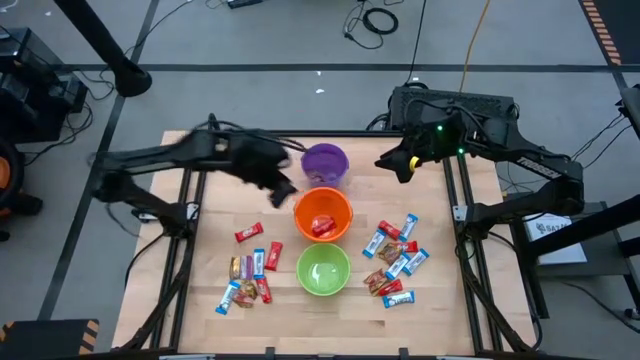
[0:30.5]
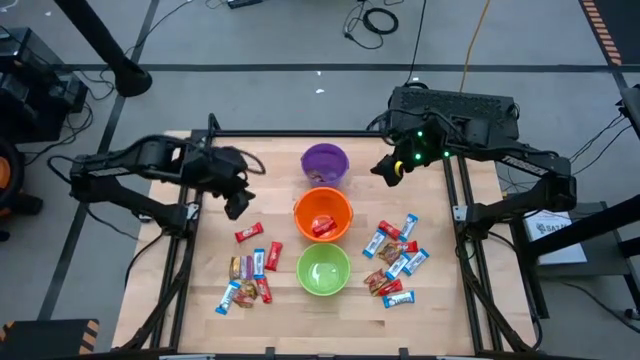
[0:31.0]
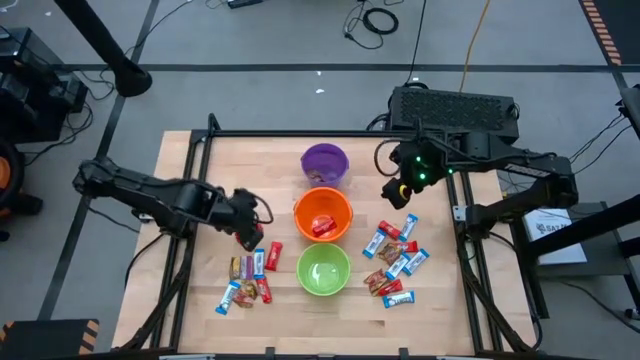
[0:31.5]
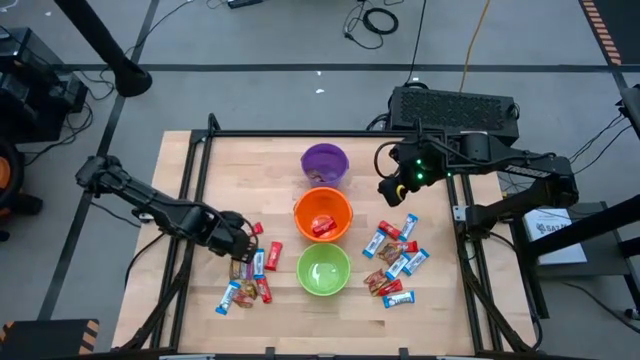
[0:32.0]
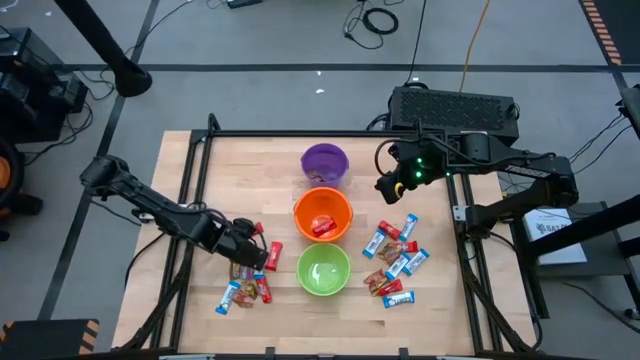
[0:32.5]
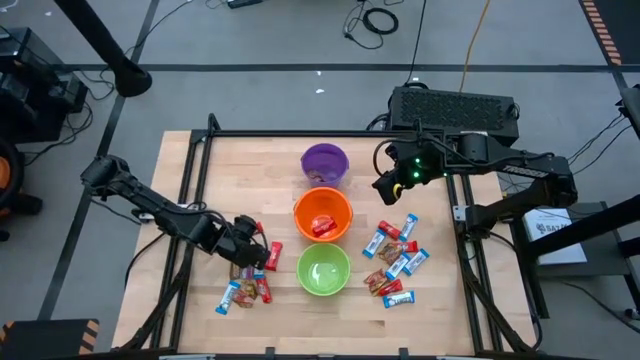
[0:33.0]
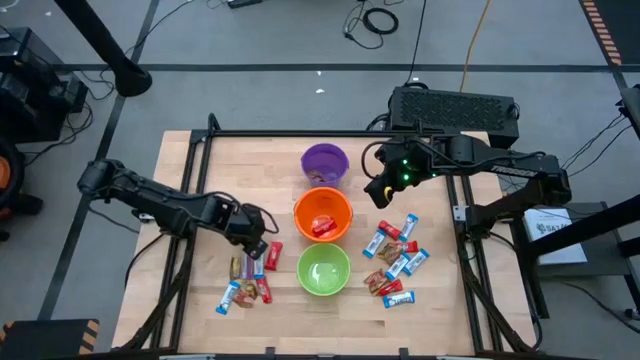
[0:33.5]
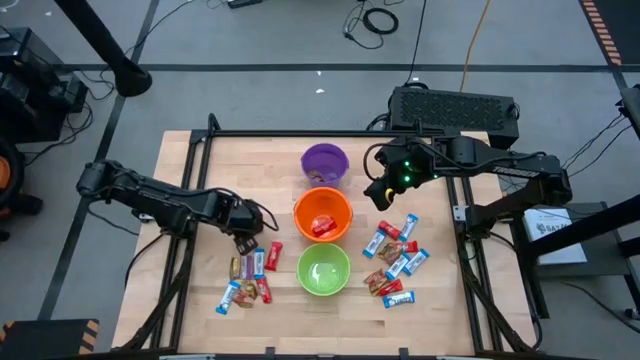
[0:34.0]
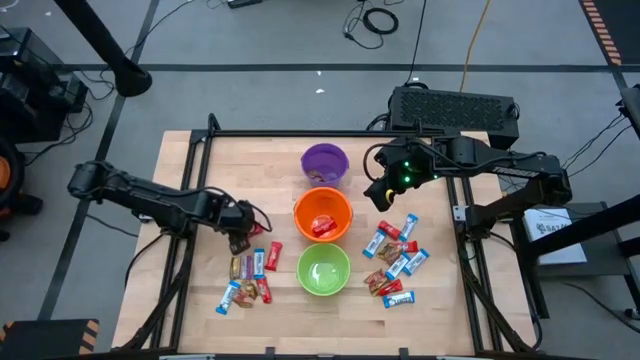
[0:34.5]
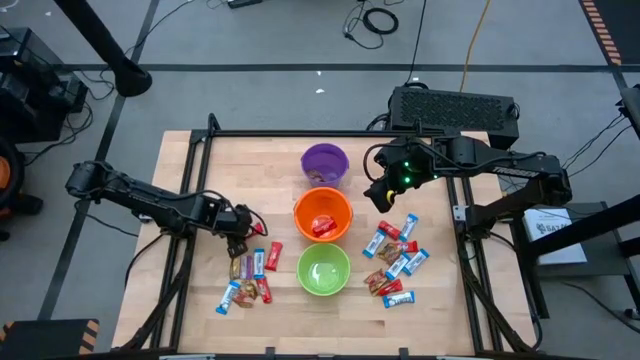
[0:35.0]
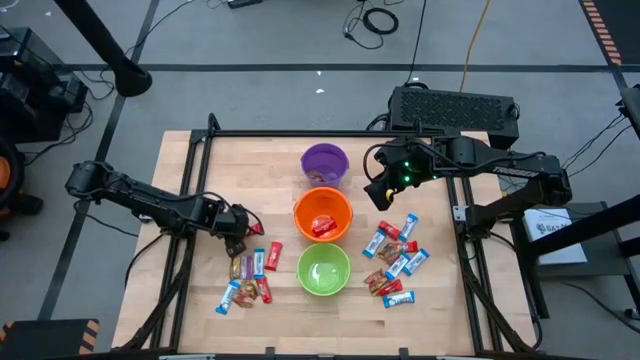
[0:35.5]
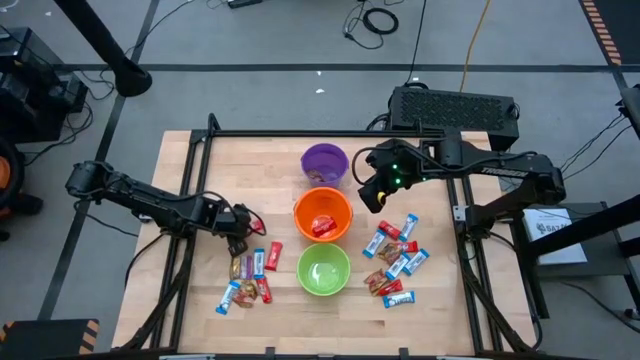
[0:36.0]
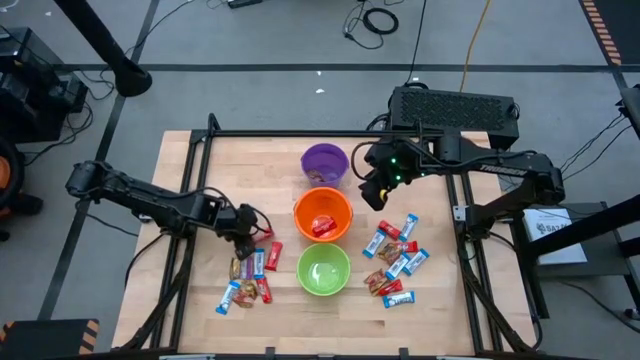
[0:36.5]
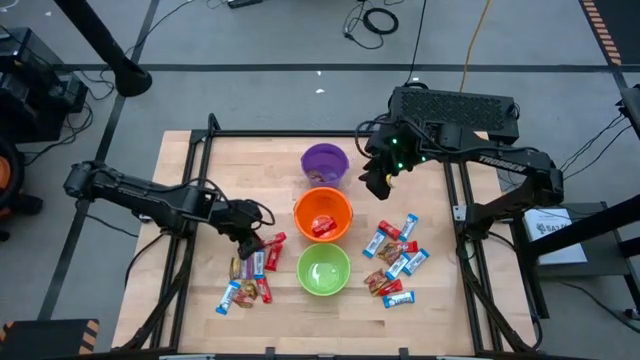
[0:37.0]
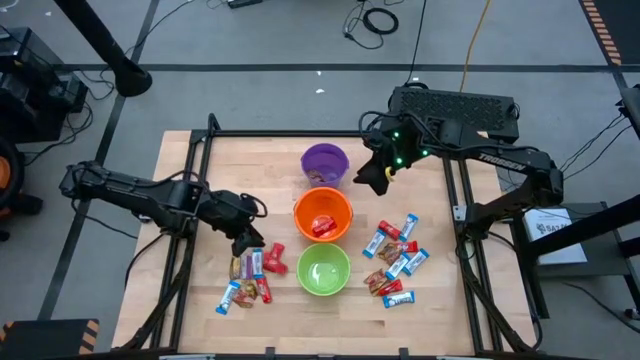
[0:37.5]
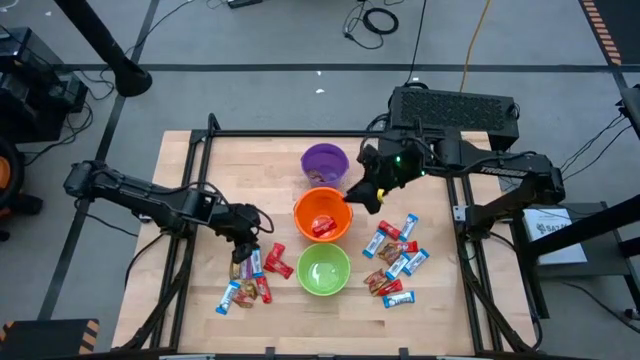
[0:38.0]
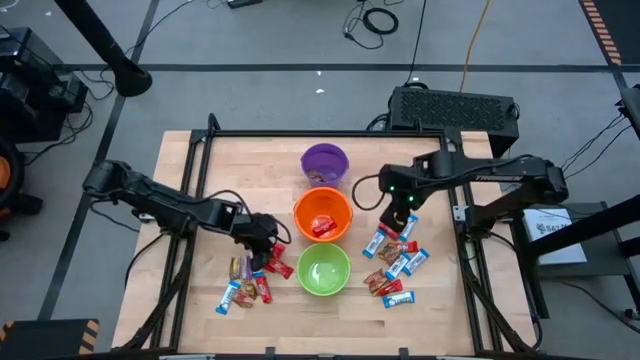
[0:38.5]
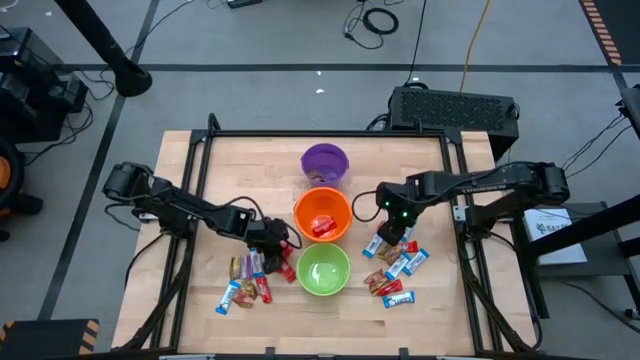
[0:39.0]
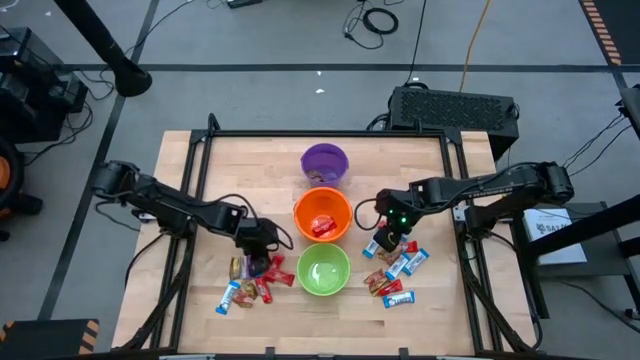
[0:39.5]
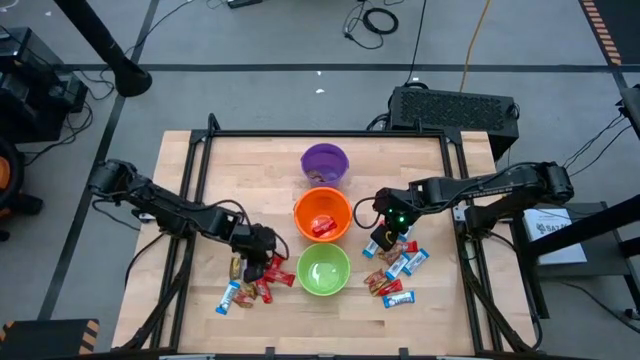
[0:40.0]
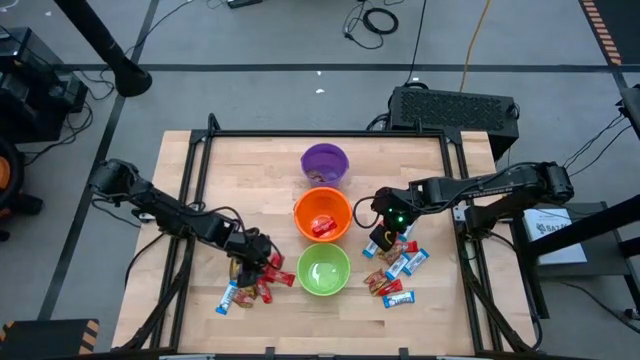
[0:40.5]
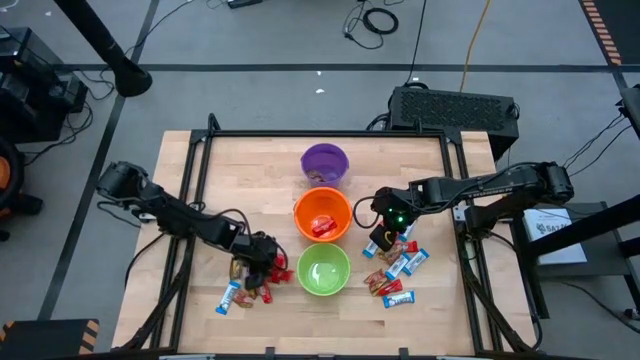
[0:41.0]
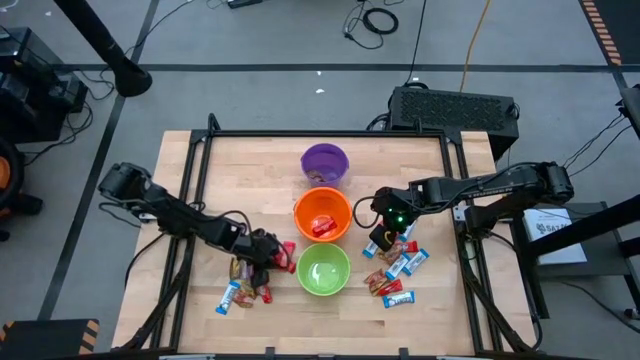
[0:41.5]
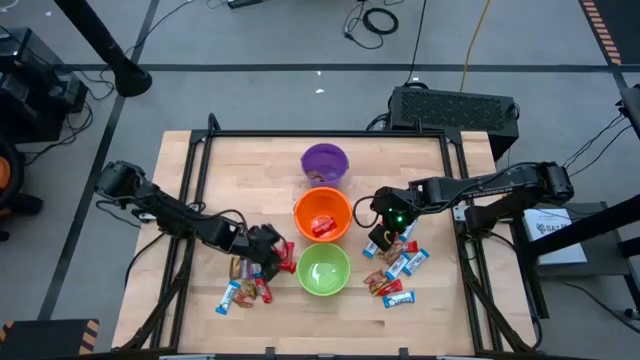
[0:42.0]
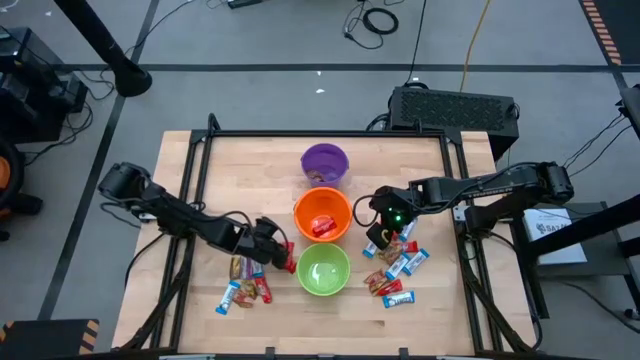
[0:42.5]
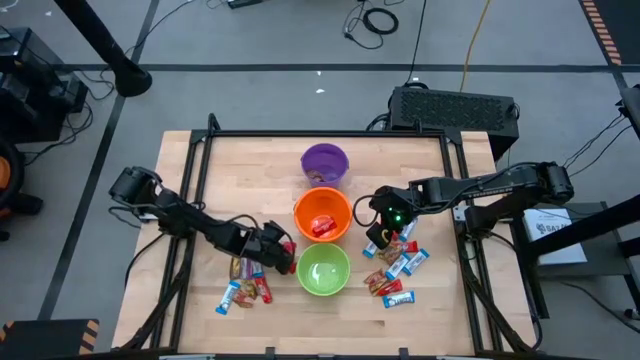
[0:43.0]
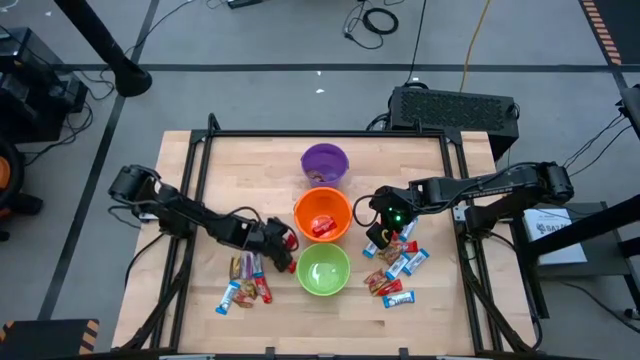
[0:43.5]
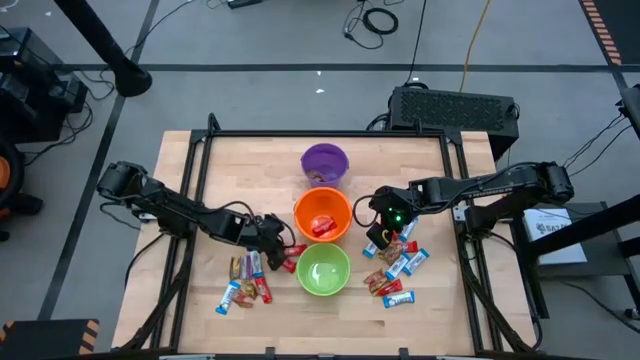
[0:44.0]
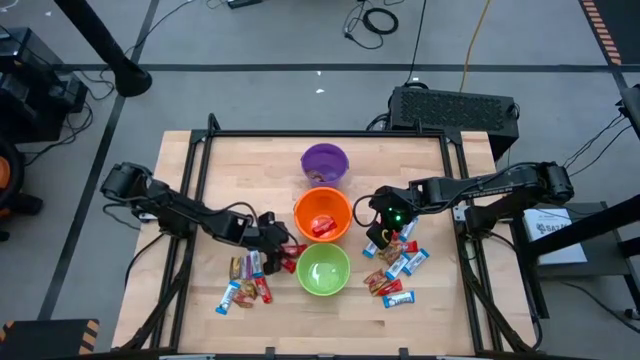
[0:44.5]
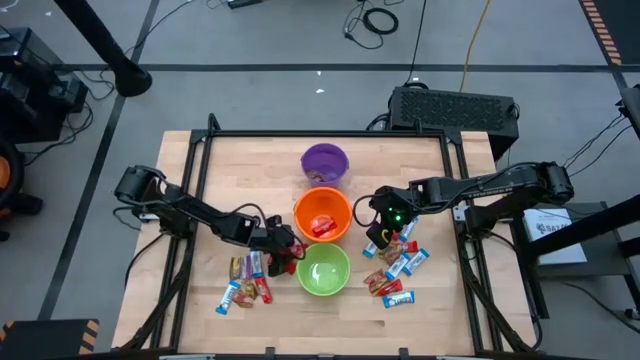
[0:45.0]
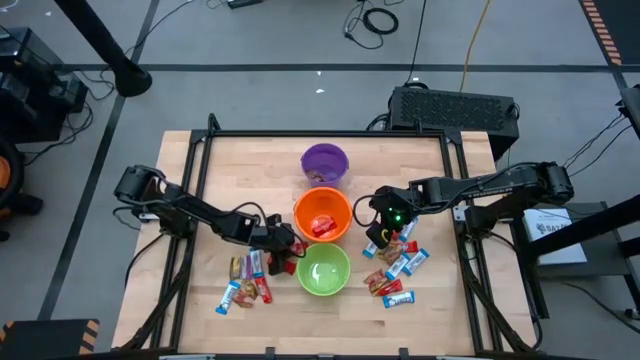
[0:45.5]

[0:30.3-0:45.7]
Task: Sort candy by brand, put in halloween buckets
Put red chocolate bar into the orange bucket

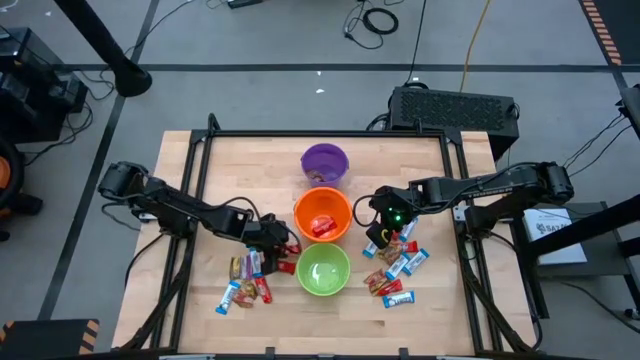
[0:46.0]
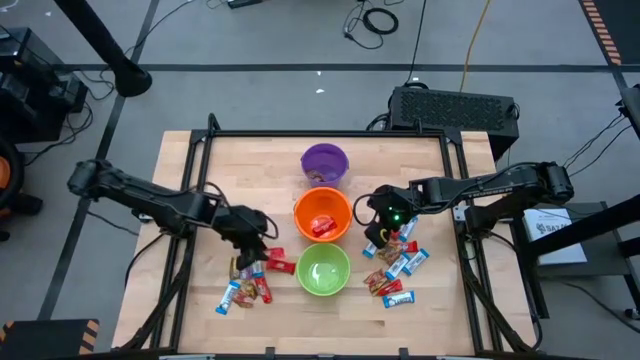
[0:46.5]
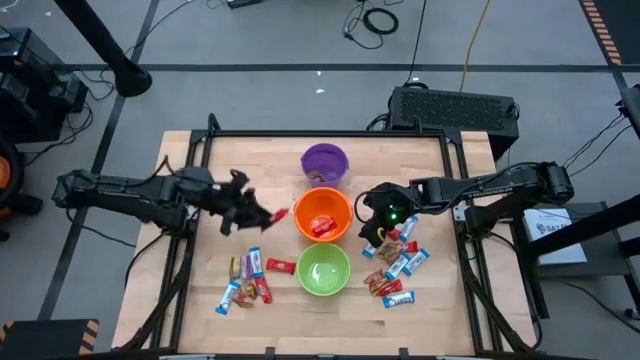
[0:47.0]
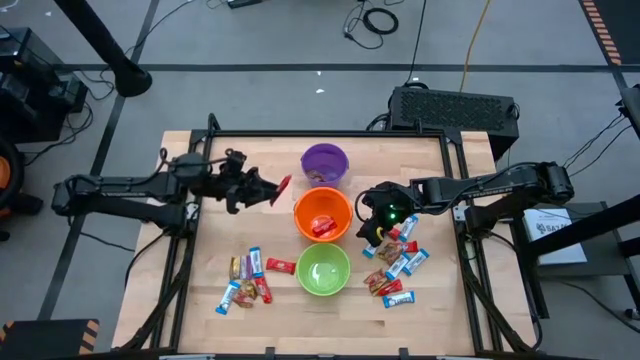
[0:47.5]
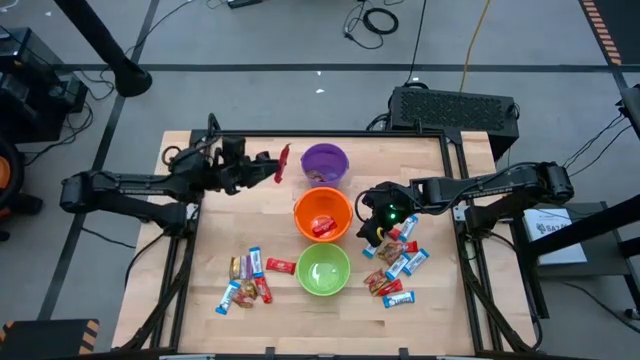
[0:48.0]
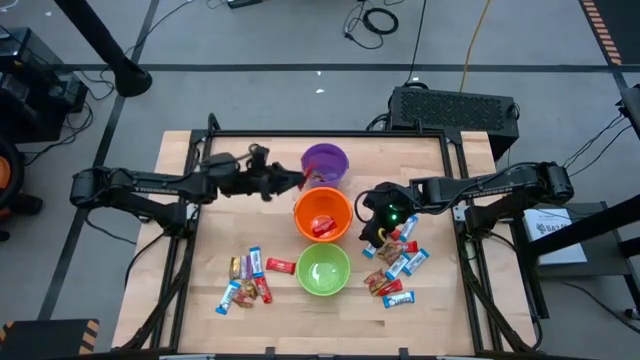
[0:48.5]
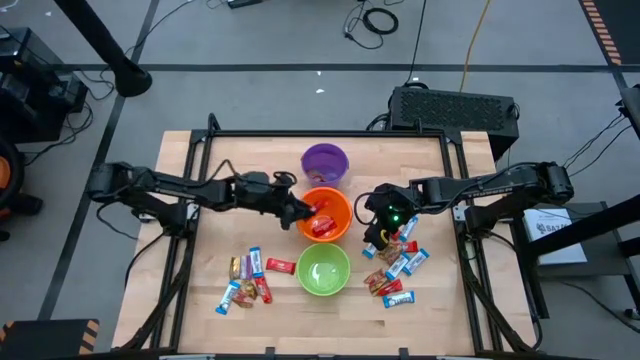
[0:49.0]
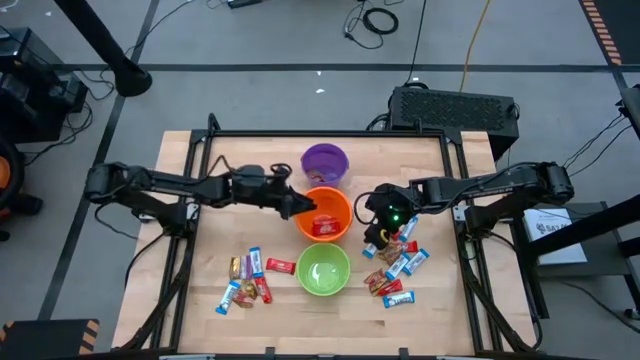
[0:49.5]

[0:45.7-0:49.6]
Put red chocolate bar into the orange bucket

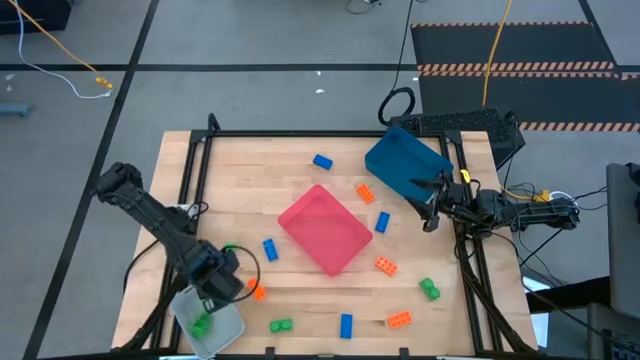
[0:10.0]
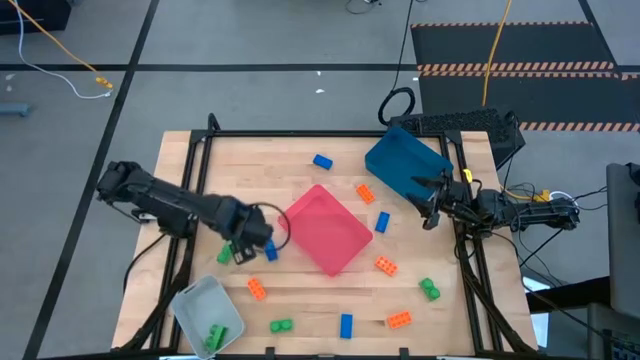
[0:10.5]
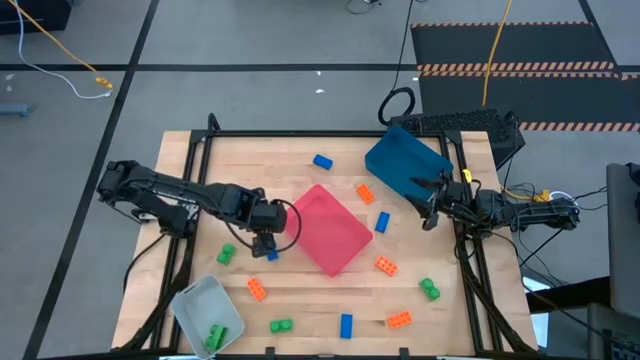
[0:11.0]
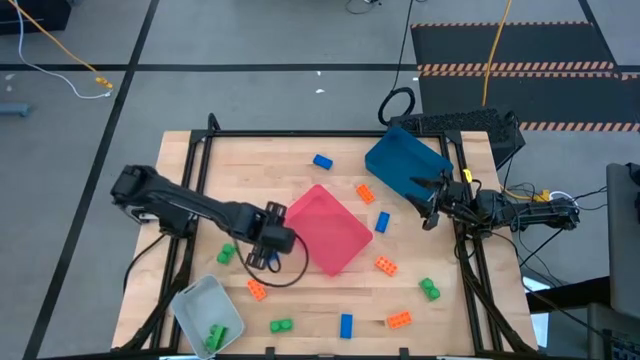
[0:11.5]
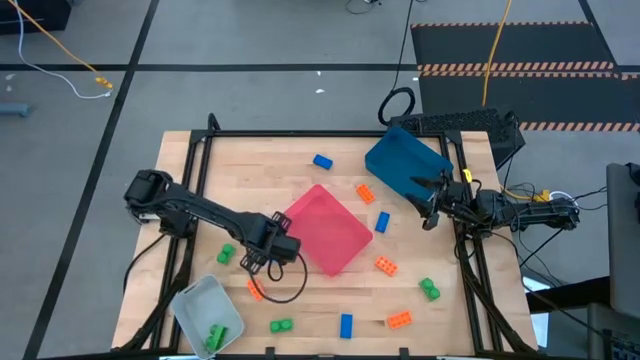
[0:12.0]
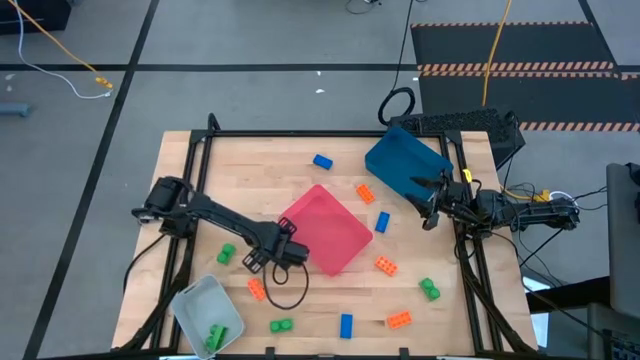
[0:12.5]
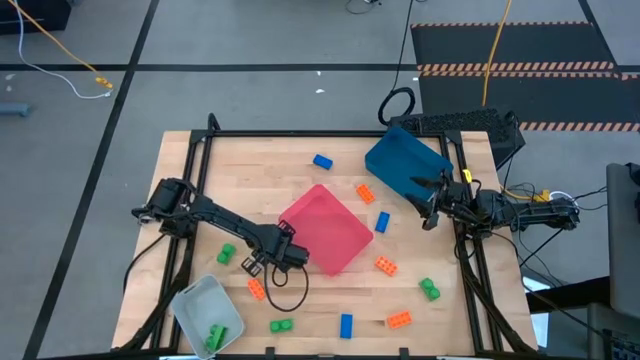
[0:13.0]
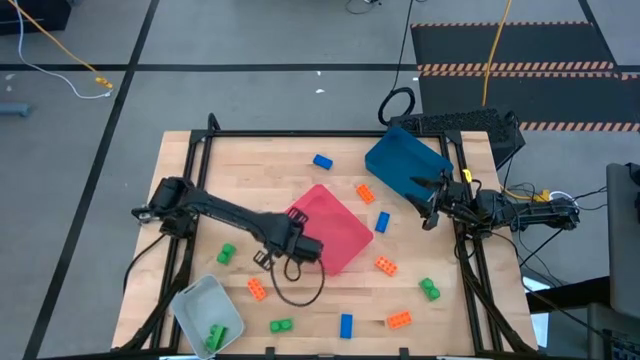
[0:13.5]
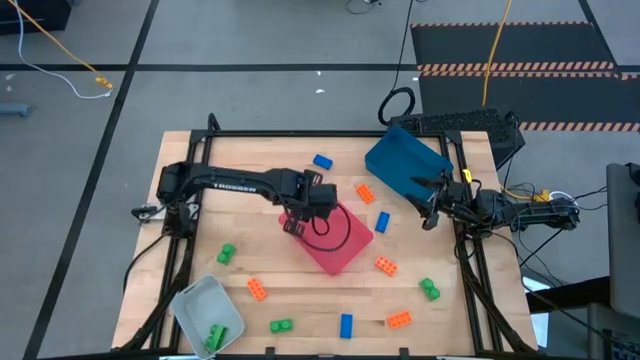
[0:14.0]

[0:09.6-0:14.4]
Task: Sort & place blocks by color
Put the blue game piece into the red bin
